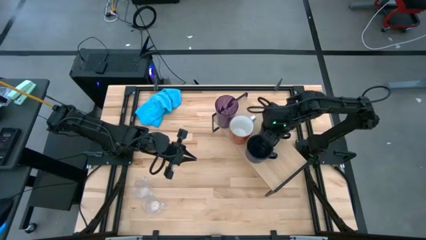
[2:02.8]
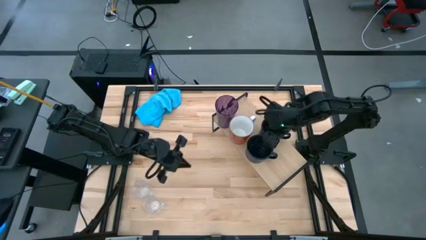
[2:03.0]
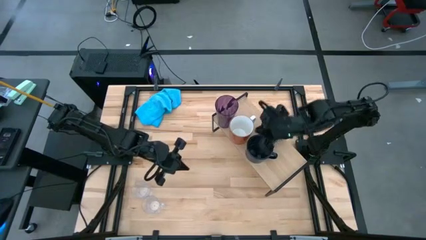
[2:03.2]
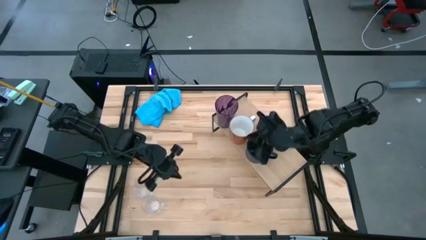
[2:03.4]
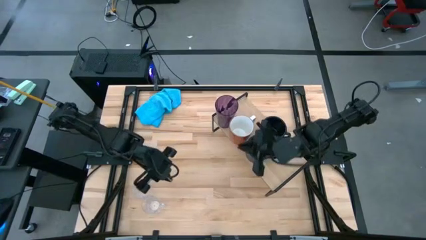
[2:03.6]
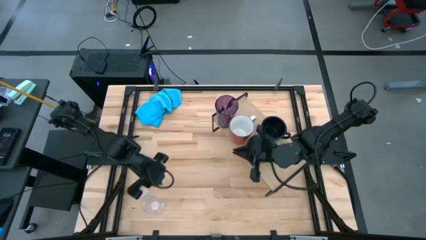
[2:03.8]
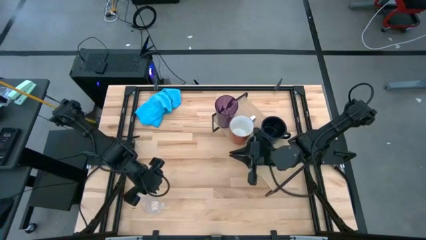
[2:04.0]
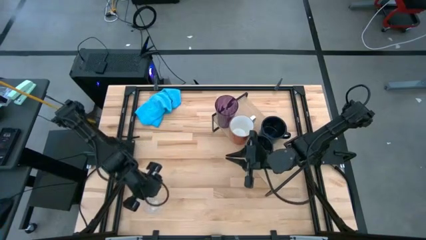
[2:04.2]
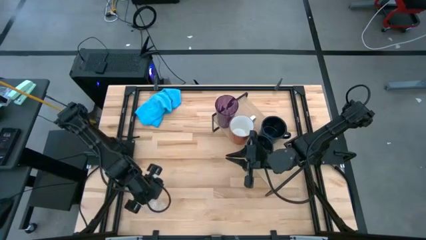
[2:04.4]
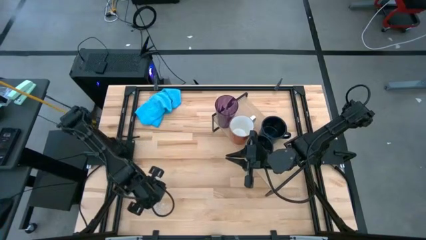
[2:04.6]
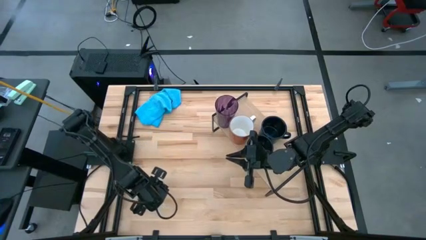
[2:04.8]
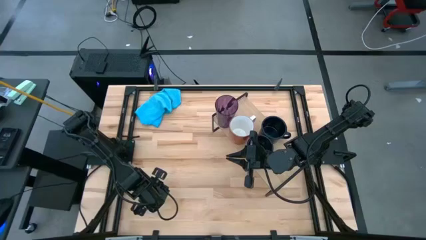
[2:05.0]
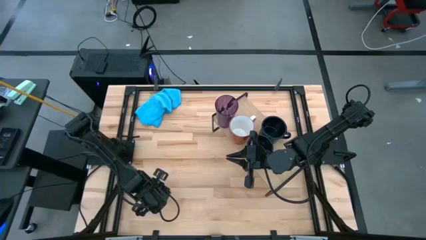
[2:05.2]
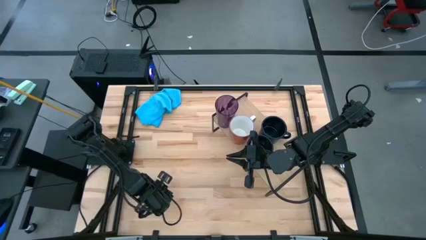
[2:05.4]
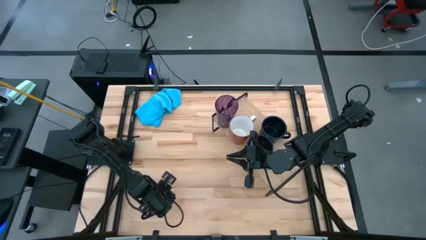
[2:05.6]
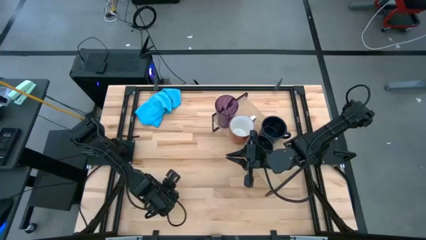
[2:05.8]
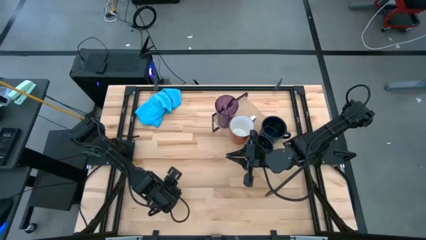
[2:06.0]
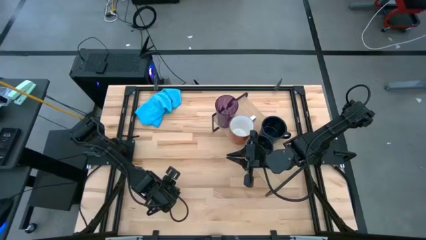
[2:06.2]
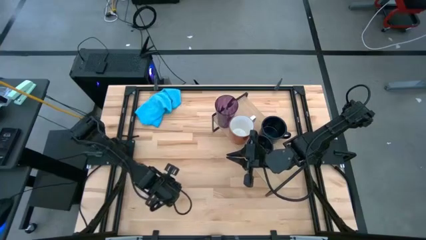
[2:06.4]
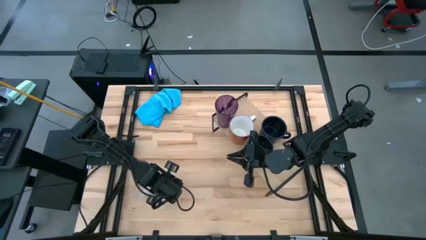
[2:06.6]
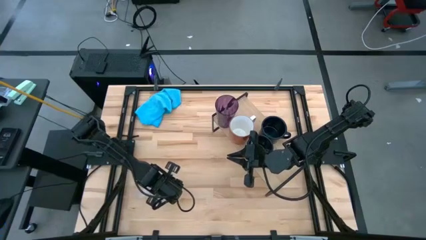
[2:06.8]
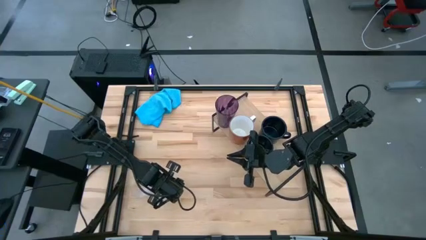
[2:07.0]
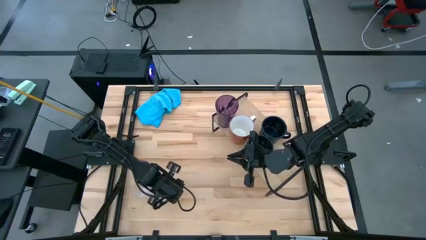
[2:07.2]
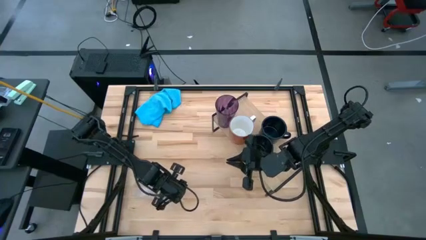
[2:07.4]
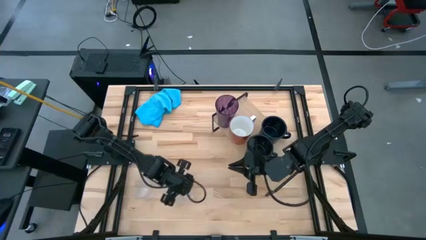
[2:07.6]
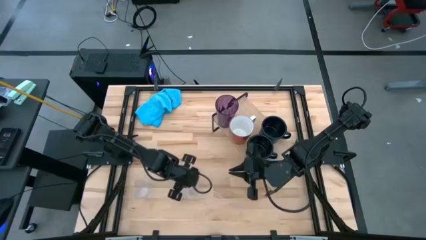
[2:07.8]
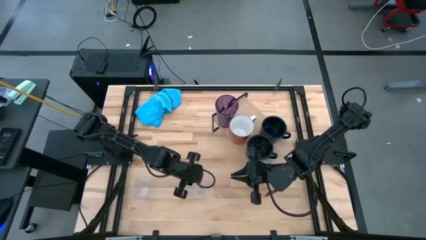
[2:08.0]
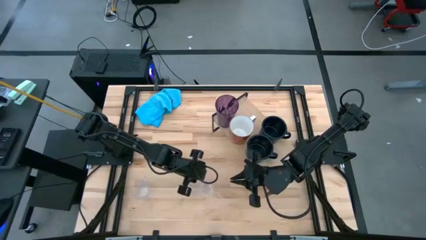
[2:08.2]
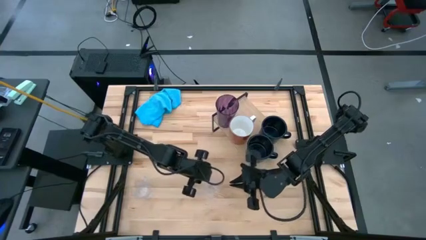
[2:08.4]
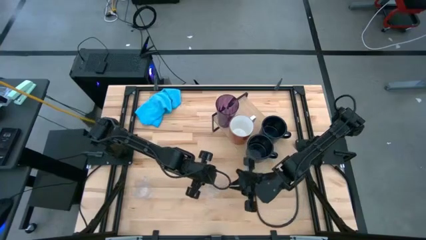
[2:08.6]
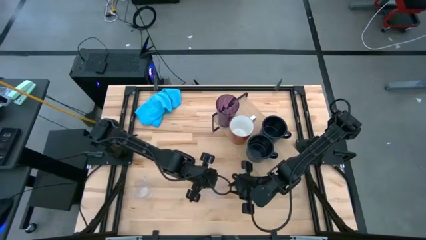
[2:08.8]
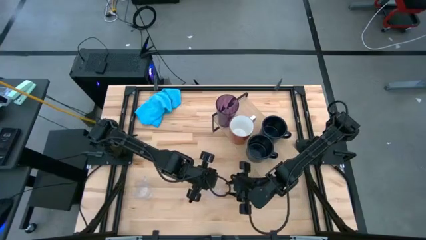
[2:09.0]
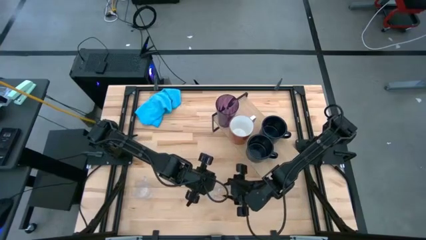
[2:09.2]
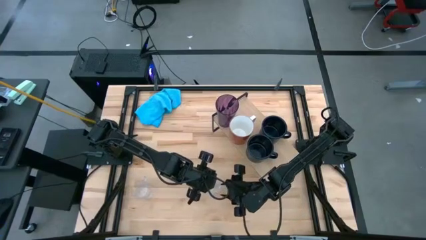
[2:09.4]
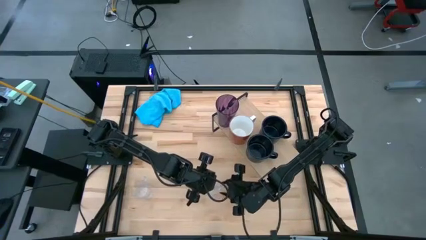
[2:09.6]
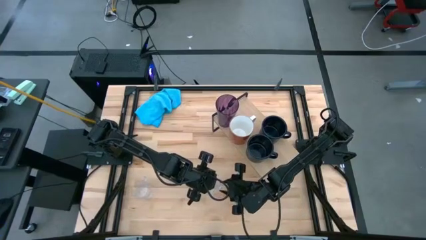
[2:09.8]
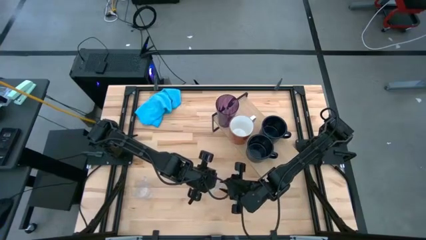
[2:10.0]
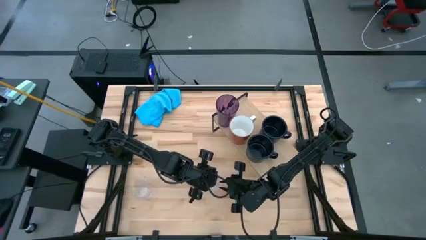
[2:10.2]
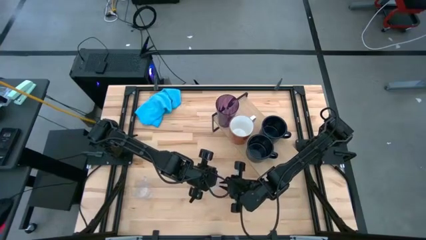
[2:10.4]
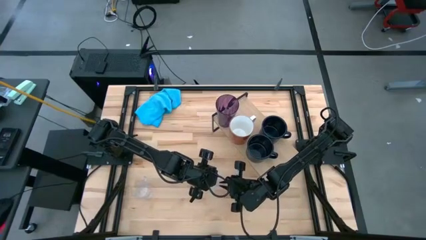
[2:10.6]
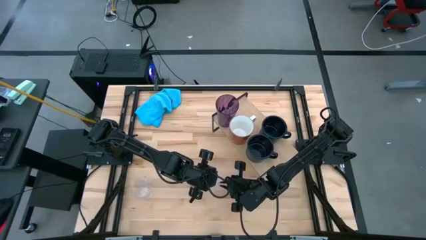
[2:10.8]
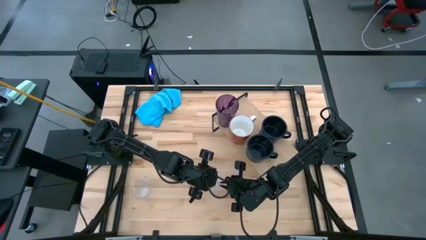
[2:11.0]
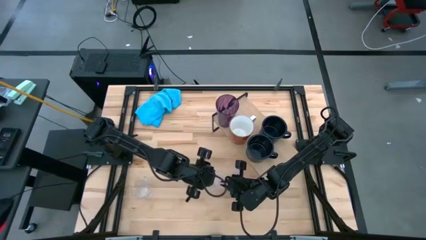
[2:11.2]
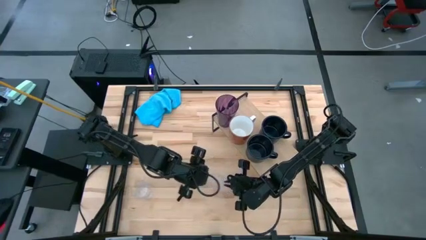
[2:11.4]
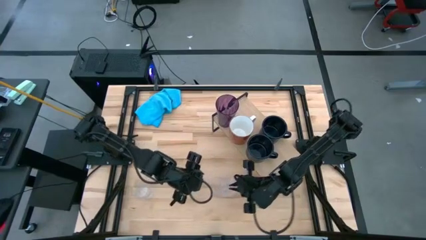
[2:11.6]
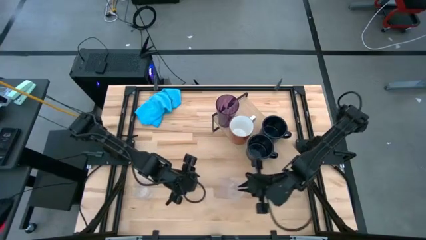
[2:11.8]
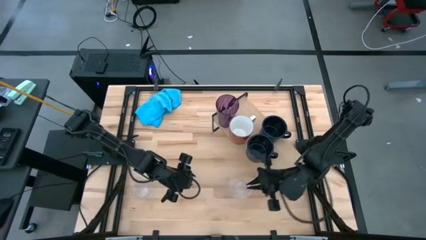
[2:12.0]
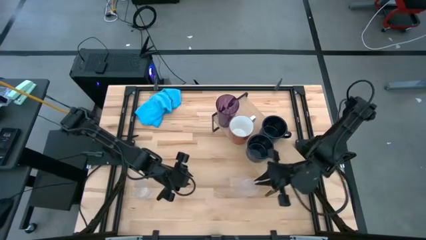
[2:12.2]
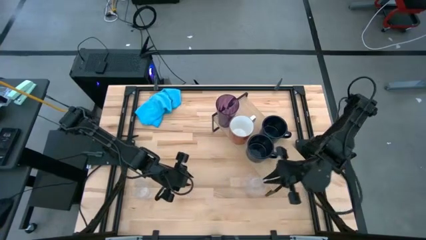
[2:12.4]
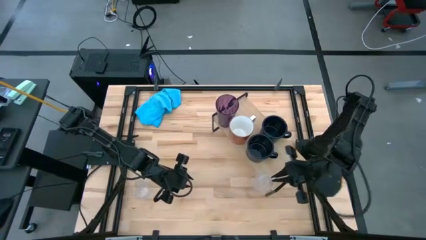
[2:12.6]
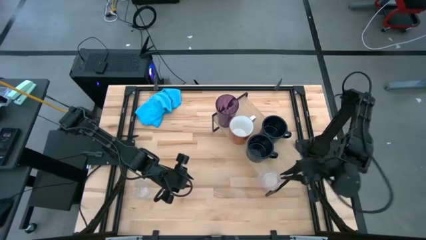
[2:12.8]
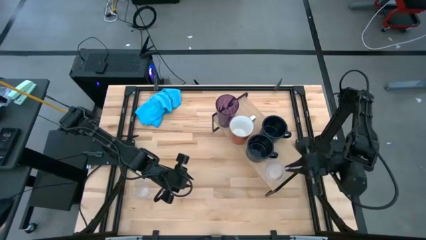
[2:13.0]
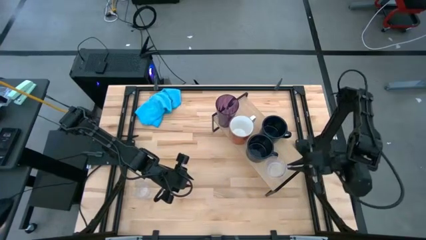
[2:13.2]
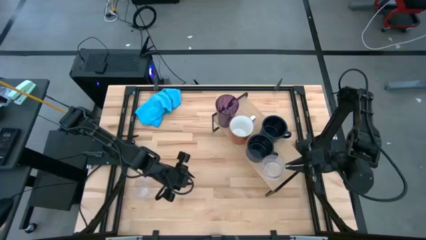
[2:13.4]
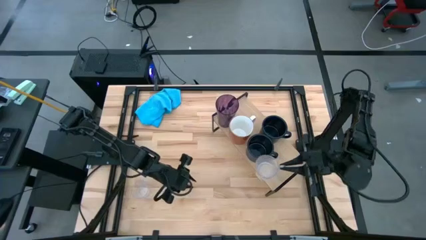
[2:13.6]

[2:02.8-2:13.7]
Task: Stack small to large cups/mugs on shelf
Put the bottom transparent mug on the shelf

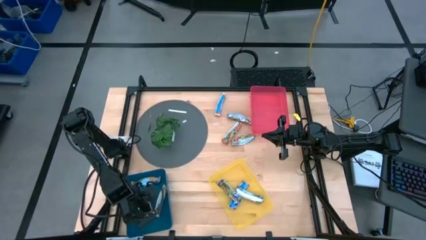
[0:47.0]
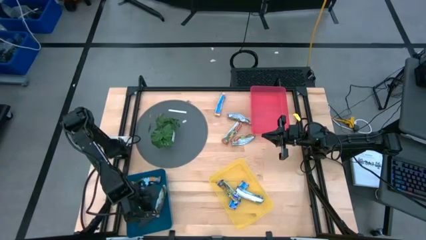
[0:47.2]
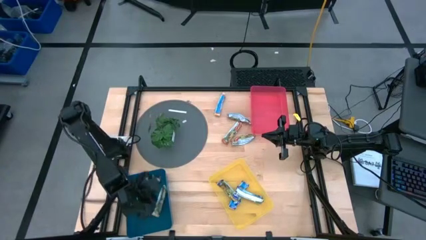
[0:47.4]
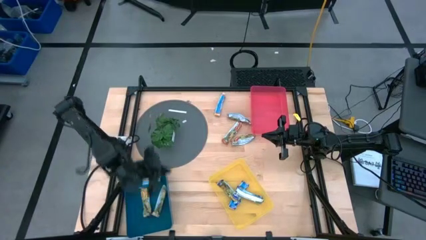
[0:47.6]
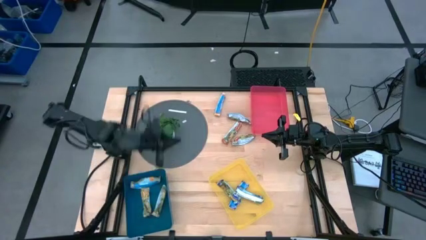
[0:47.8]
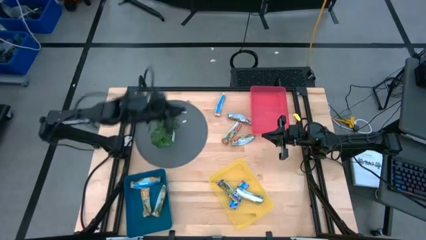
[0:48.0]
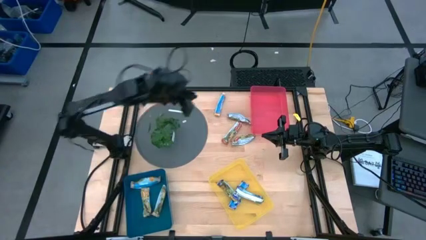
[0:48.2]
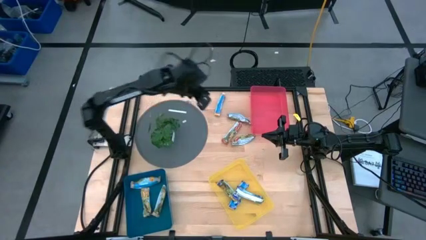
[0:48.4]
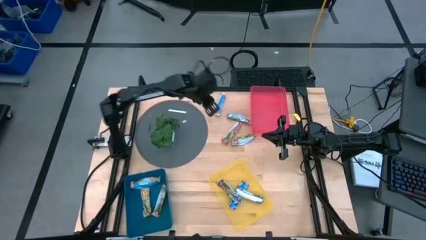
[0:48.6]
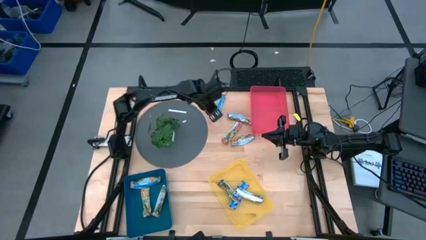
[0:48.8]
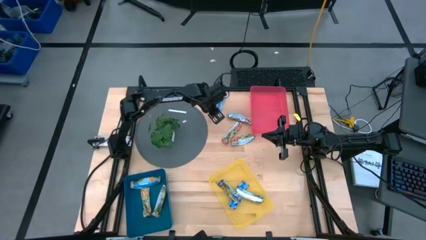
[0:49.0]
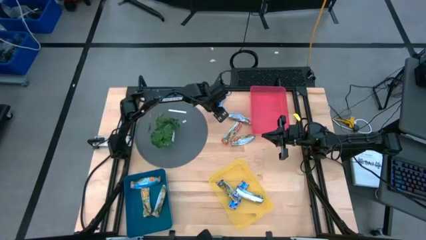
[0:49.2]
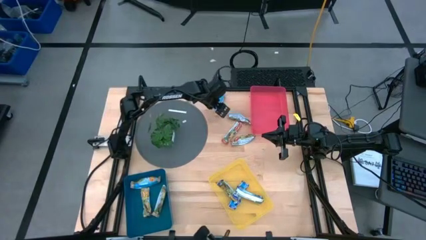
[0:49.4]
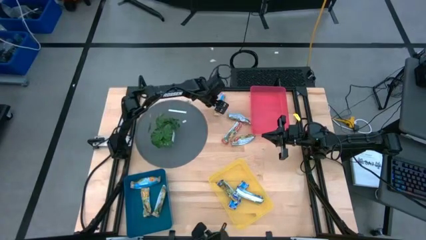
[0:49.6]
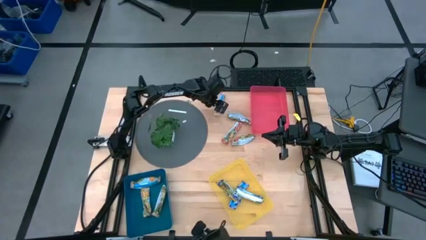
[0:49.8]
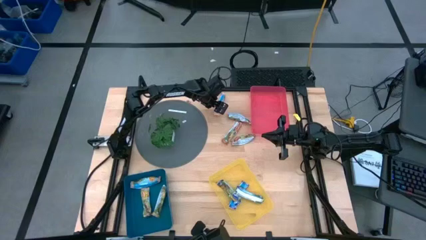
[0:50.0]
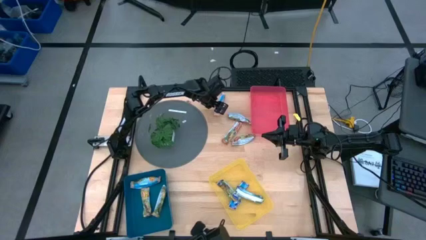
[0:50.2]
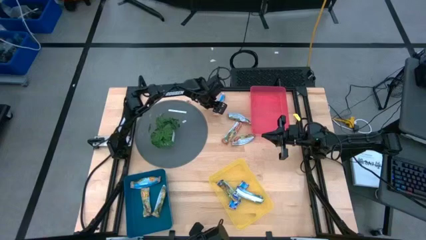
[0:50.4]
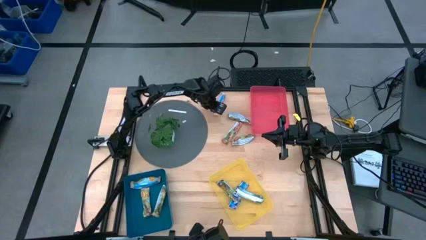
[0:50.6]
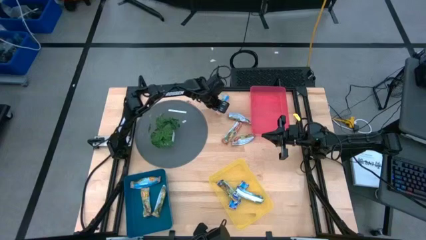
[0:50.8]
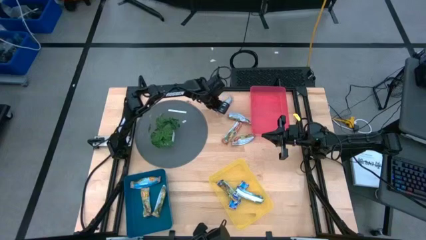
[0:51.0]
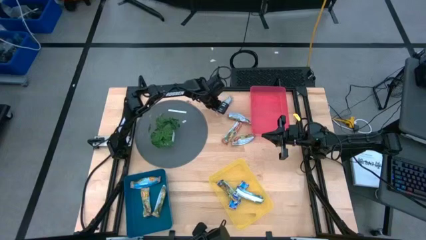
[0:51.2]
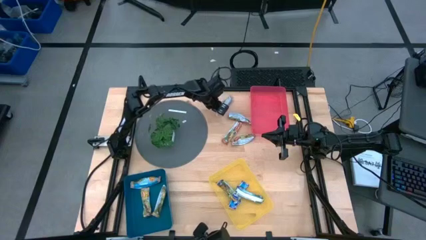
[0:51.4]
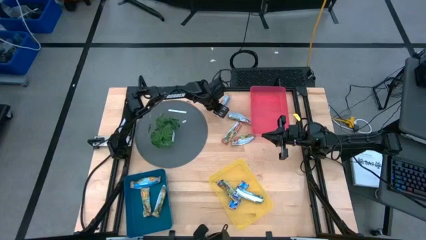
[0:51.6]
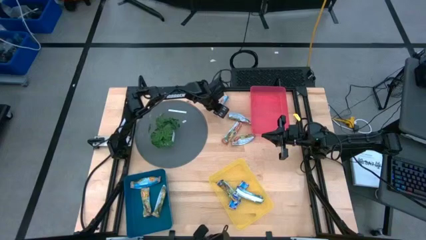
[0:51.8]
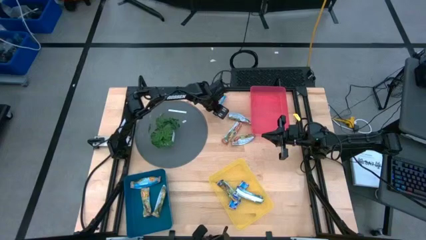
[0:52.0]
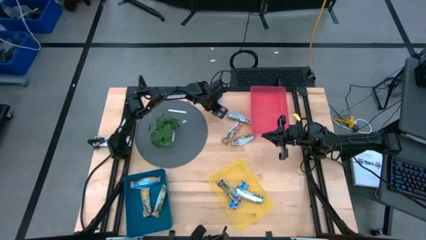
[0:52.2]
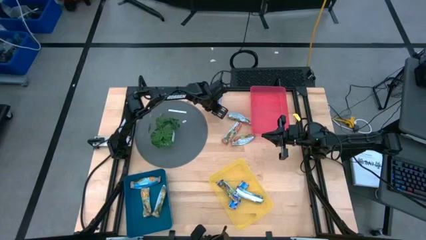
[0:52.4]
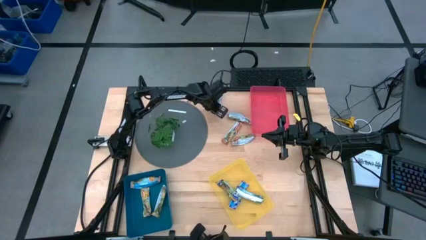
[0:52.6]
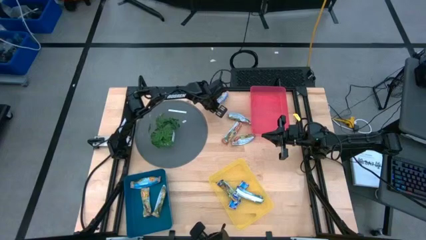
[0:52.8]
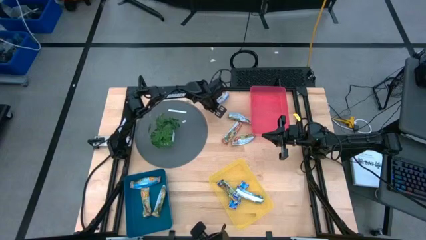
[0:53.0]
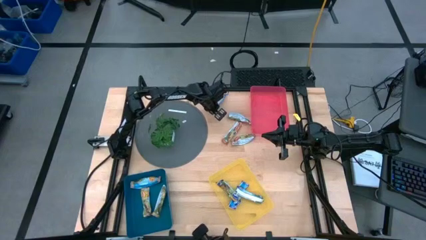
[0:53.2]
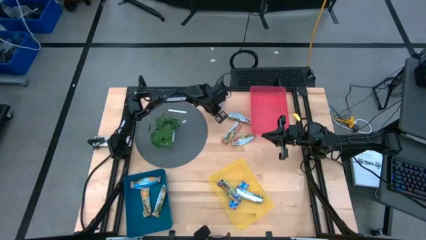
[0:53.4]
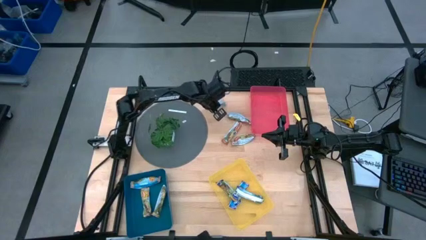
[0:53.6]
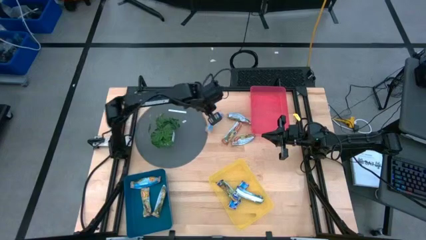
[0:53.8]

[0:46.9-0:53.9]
Task: Pick and place Granola Bars by type
Put the yellow snack into the blue bin
